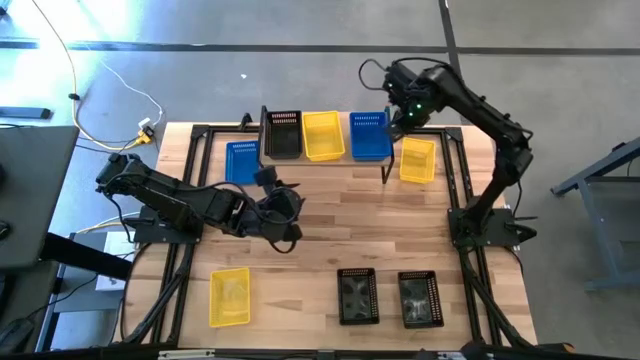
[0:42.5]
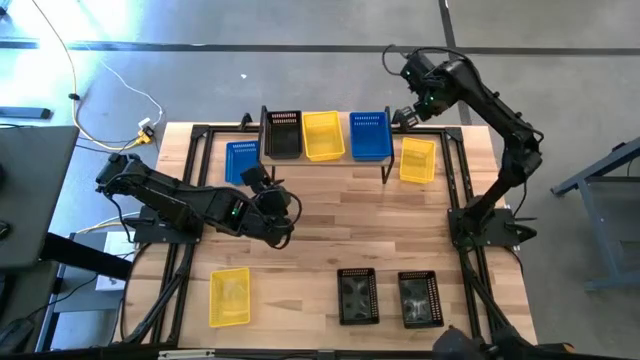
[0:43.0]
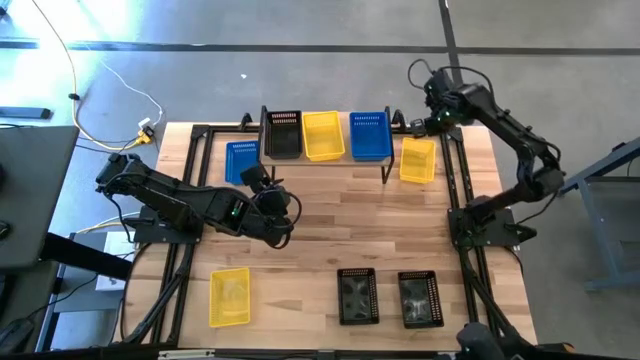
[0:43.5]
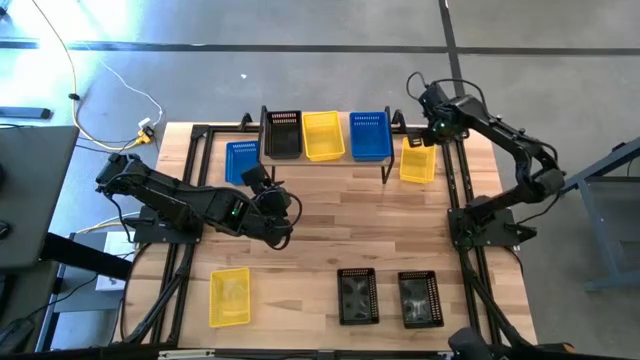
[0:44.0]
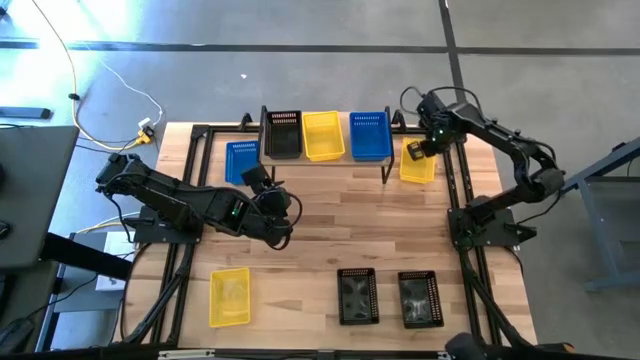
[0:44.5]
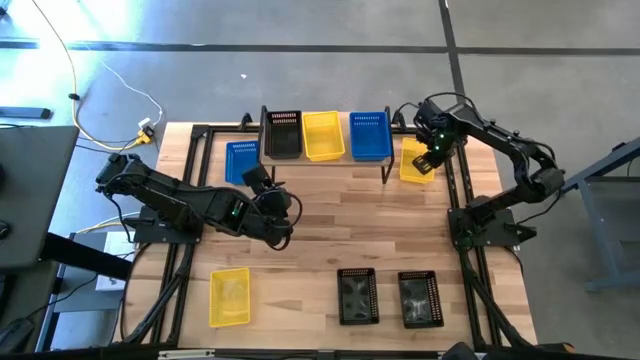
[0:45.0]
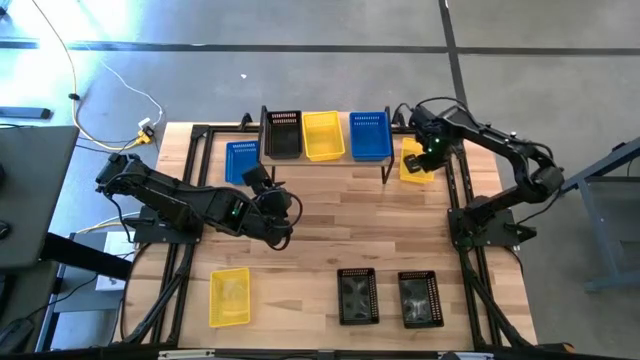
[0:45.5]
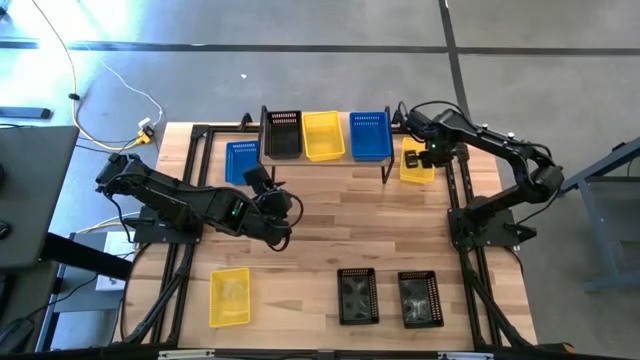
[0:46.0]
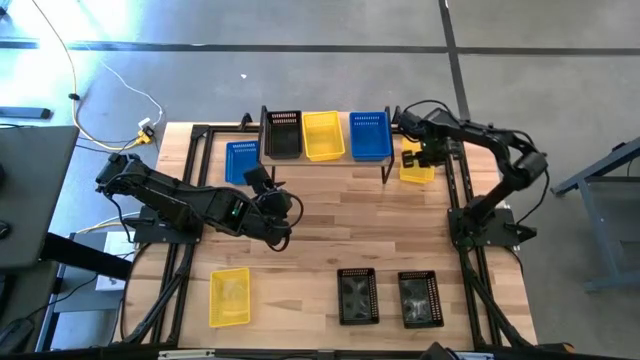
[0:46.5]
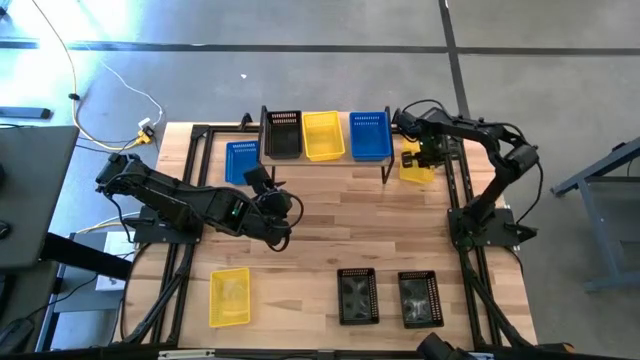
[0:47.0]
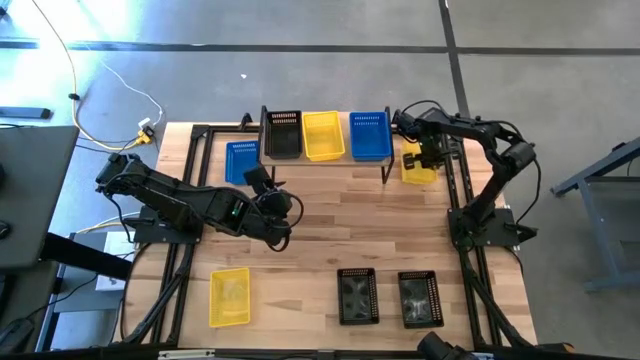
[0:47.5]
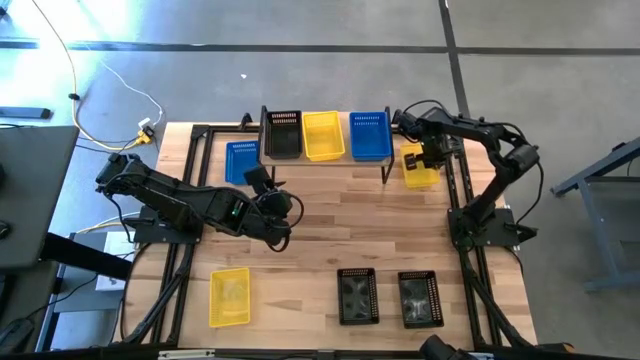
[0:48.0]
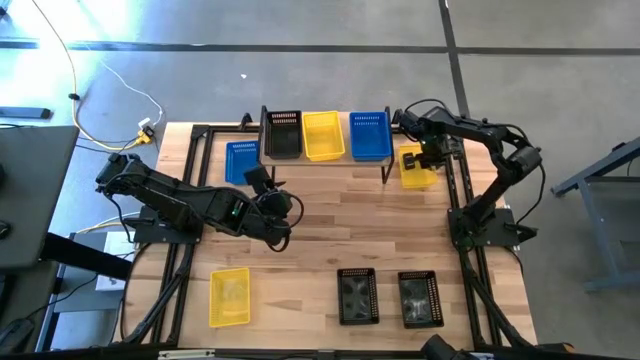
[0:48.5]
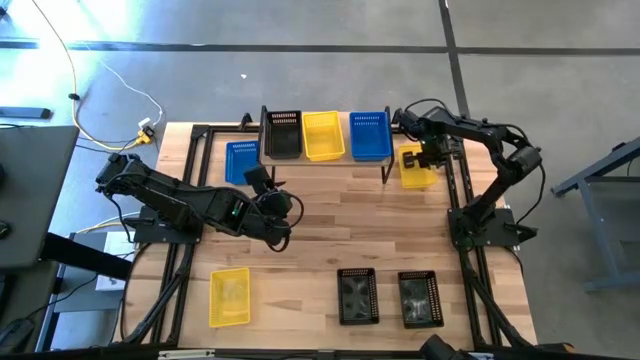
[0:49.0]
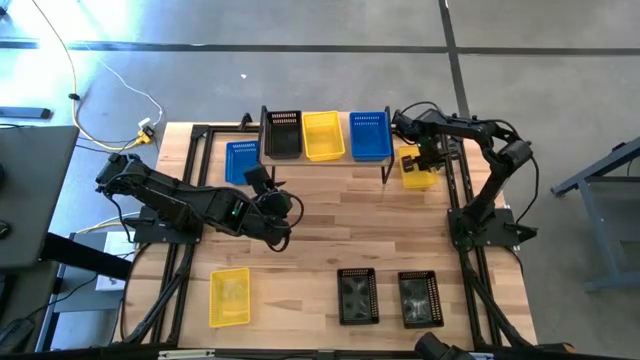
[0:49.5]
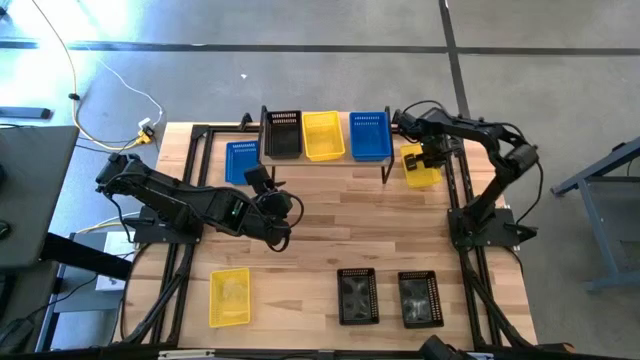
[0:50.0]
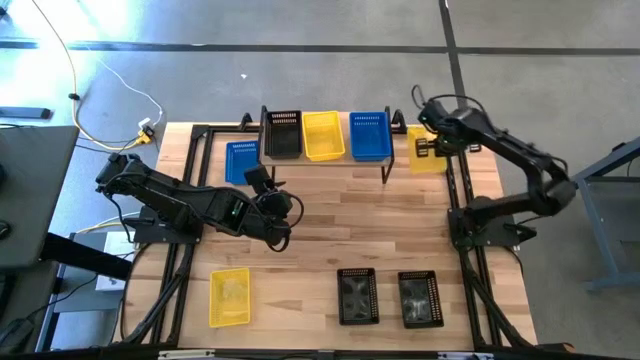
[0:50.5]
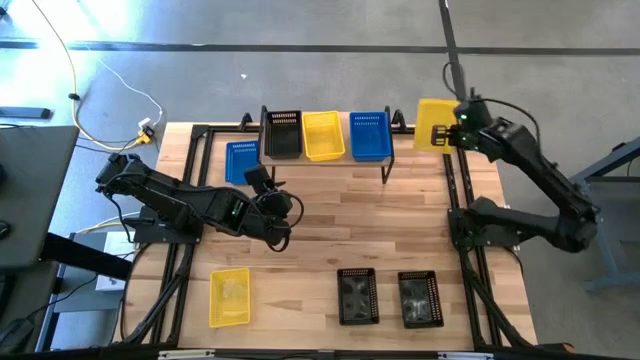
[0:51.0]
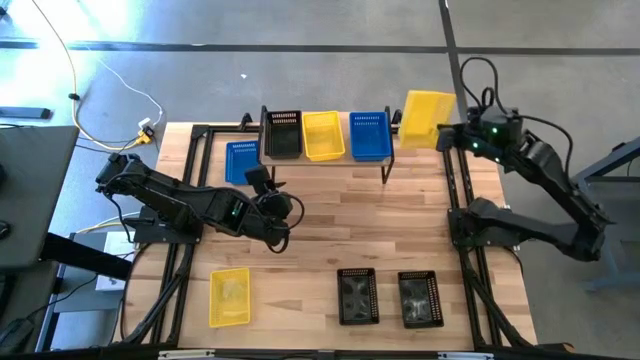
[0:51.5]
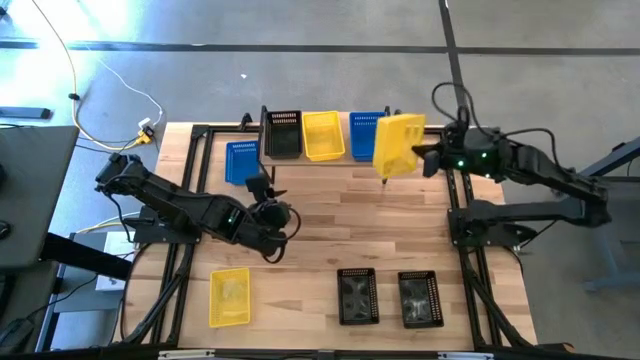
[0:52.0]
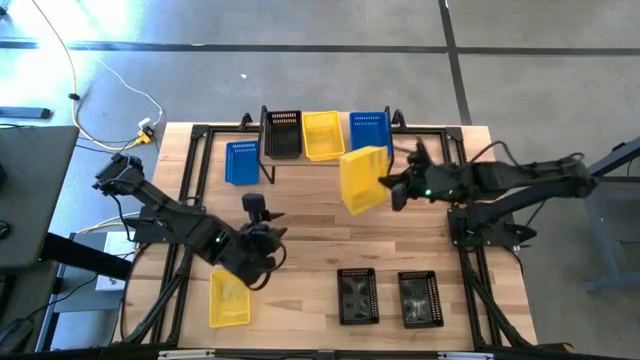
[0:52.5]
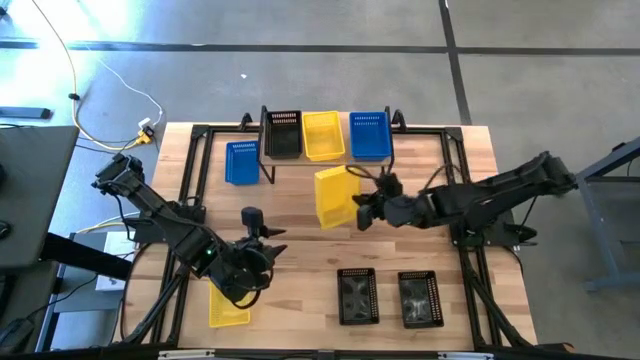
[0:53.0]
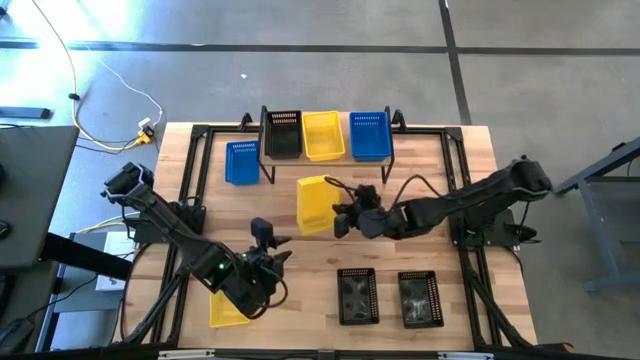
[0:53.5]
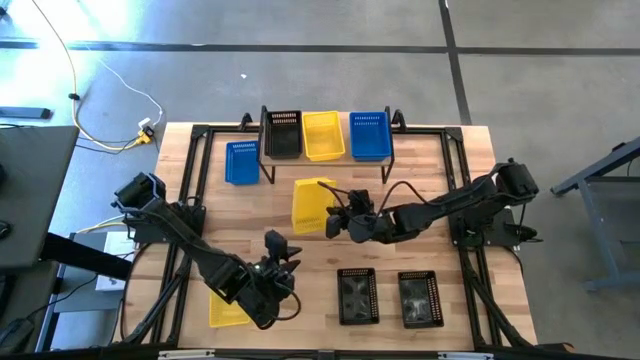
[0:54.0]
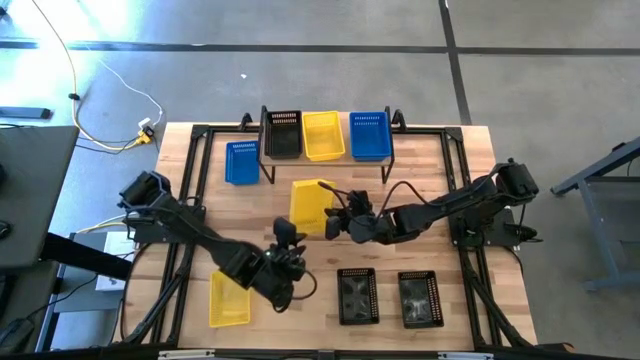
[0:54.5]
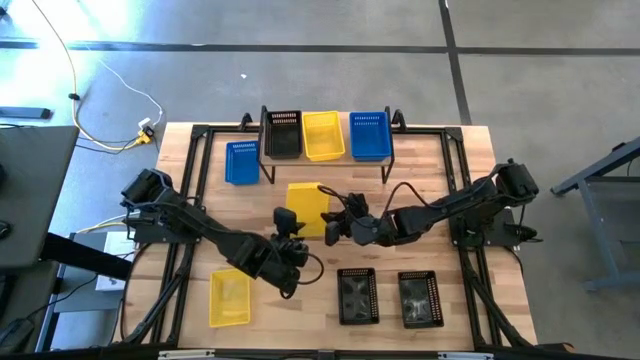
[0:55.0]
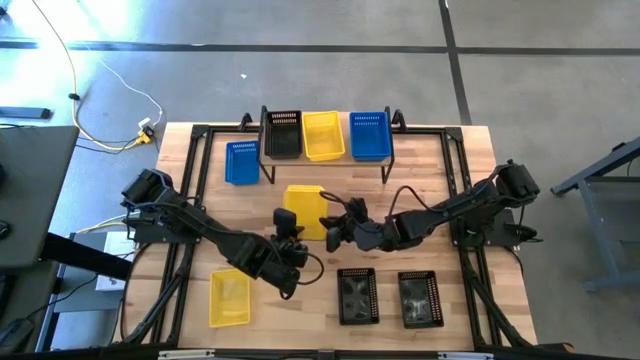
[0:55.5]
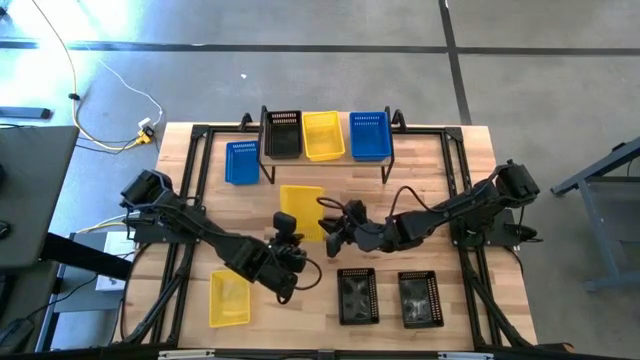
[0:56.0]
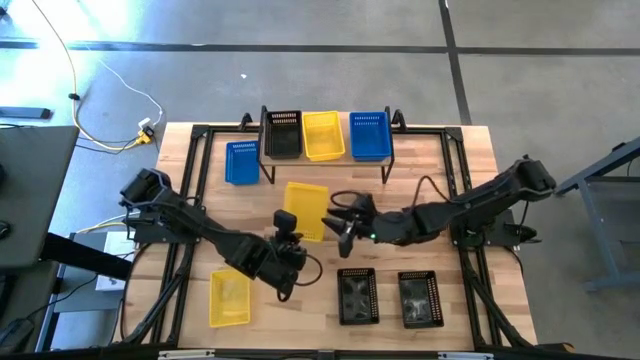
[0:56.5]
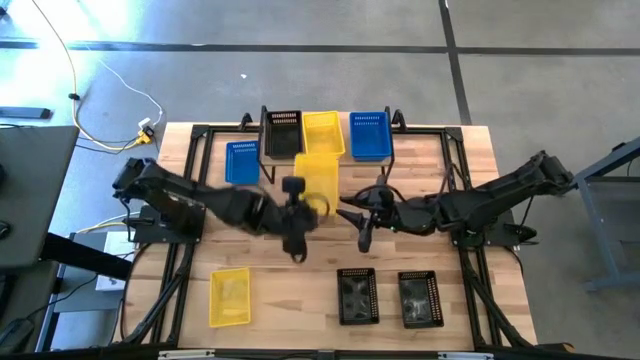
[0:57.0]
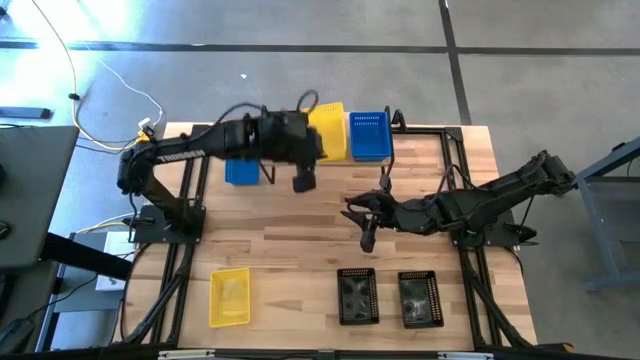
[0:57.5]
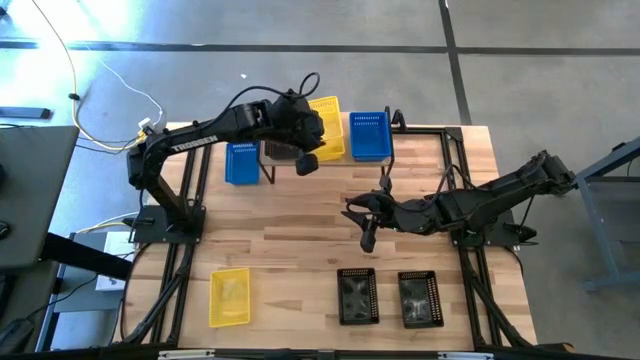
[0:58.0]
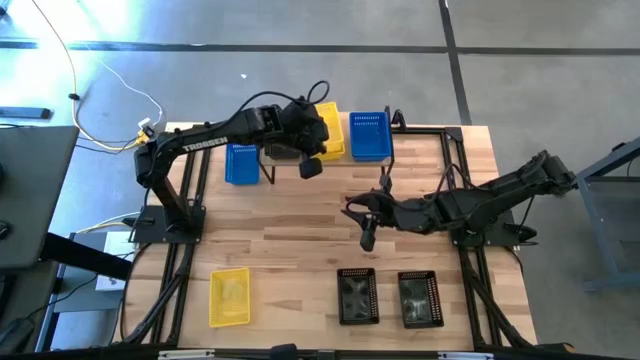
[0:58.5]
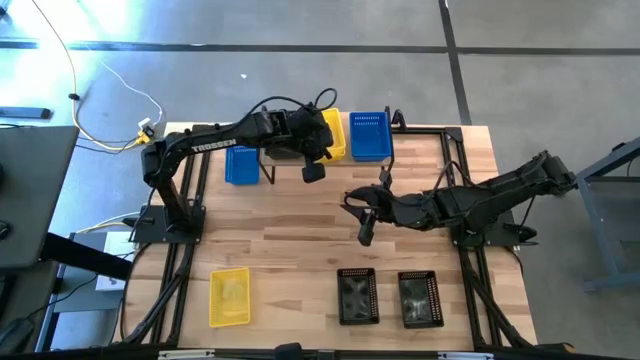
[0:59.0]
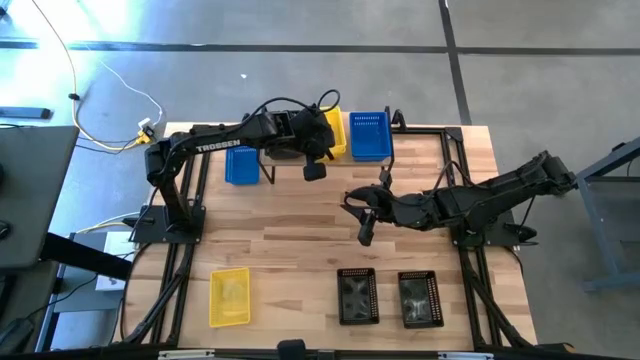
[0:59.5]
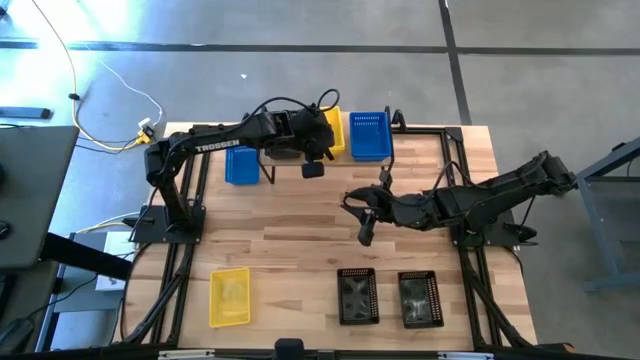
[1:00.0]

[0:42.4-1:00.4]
Task: Stack baskets on shelf by color
Stack the right yellow bin on top of the yellow bin on the shelf

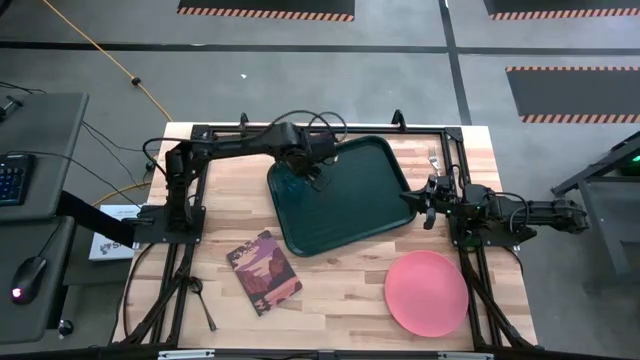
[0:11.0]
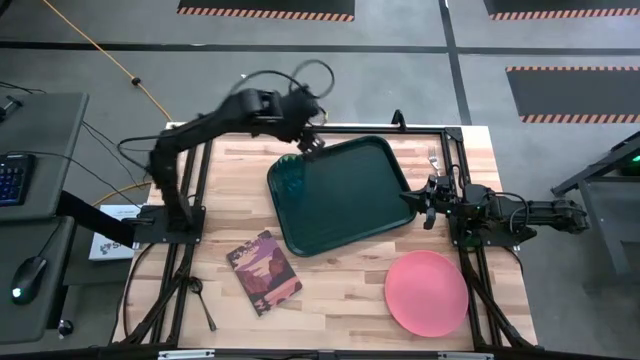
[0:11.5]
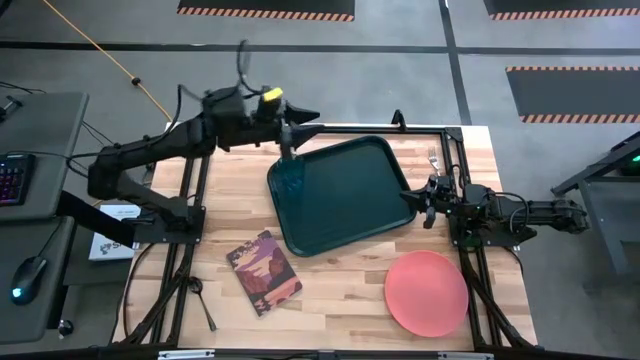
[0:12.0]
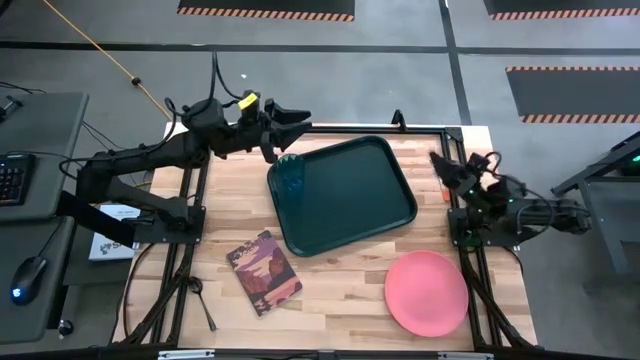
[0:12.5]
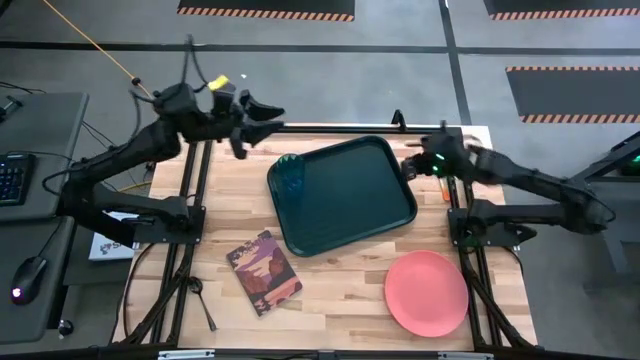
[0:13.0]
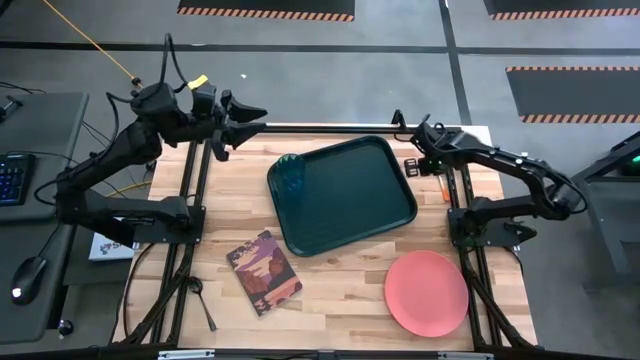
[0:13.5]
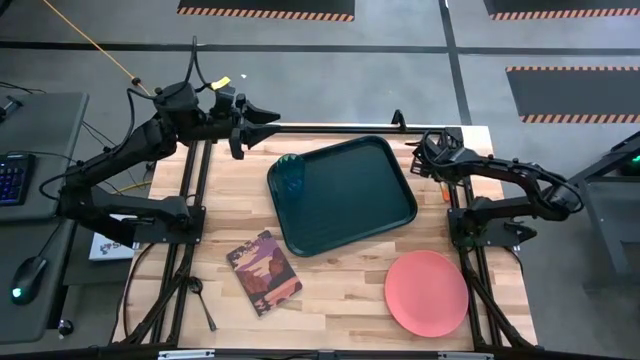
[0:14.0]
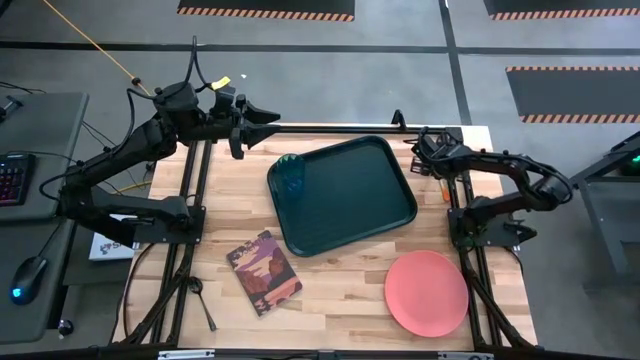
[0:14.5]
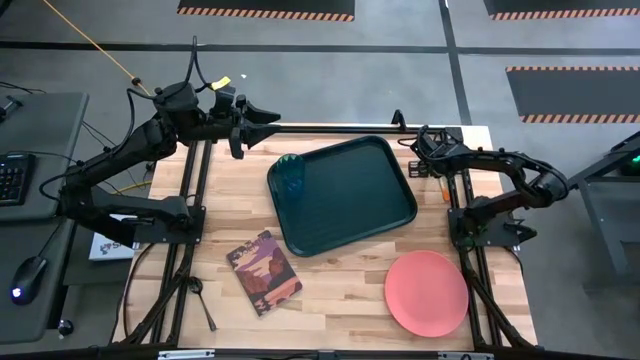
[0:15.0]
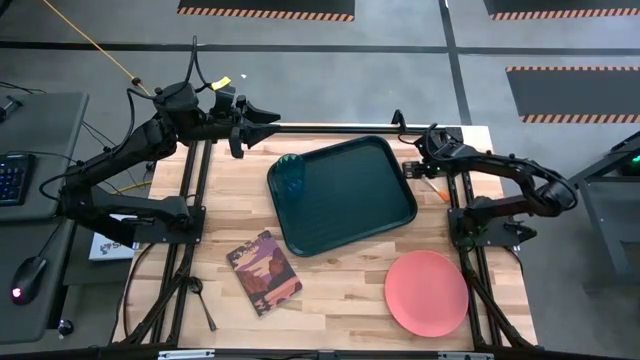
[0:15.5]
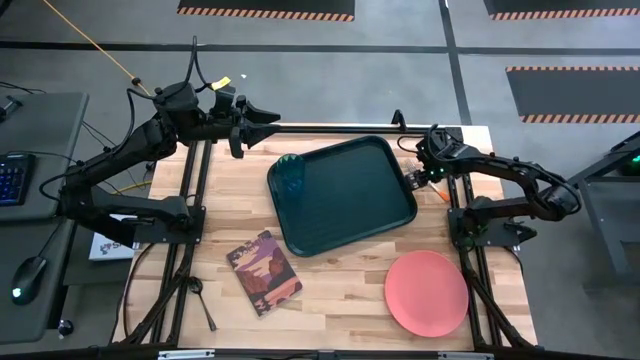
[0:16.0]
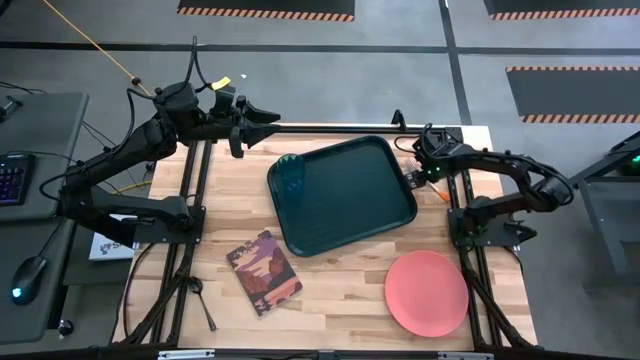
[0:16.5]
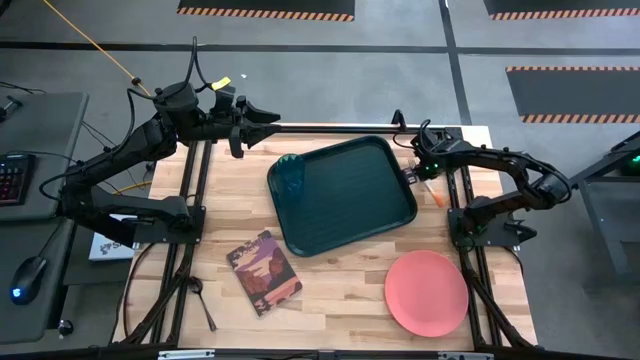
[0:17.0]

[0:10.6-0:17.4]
Task: Pick and place plate/cup/fork/spoon on tray
Put the orange fork on the black tray
